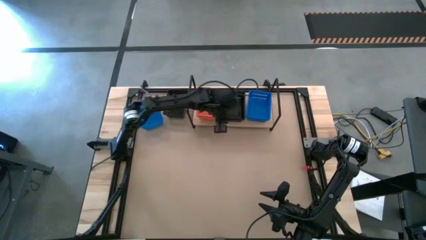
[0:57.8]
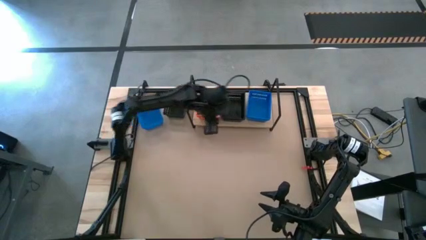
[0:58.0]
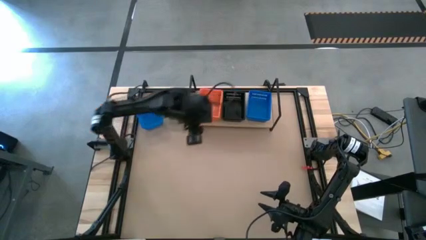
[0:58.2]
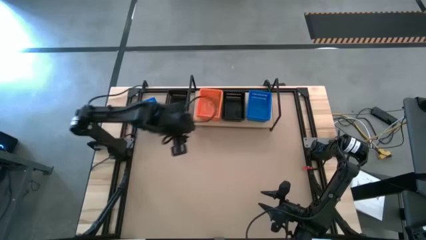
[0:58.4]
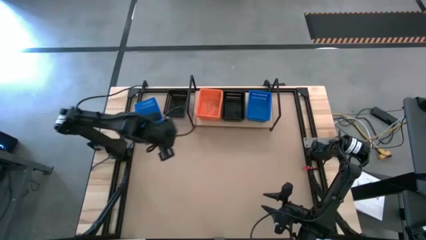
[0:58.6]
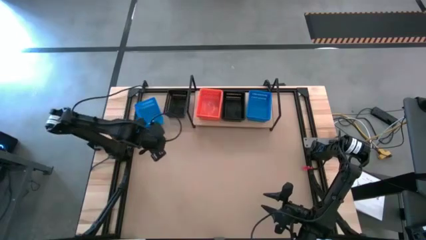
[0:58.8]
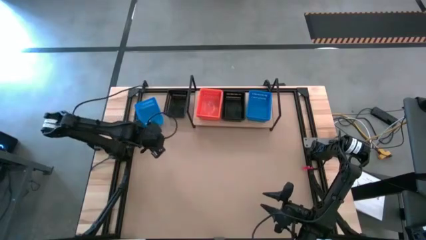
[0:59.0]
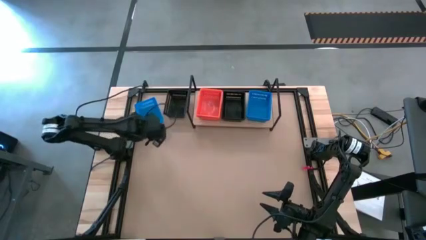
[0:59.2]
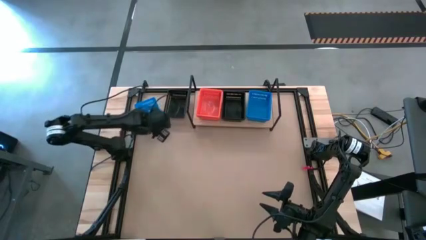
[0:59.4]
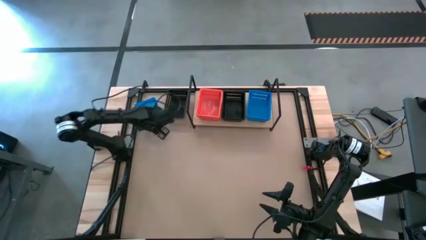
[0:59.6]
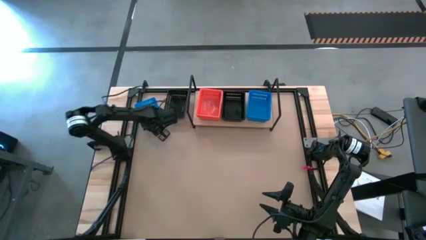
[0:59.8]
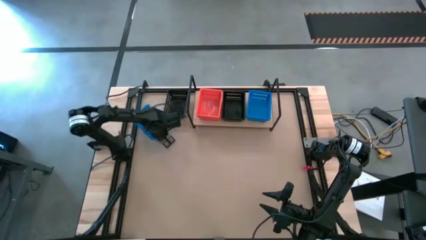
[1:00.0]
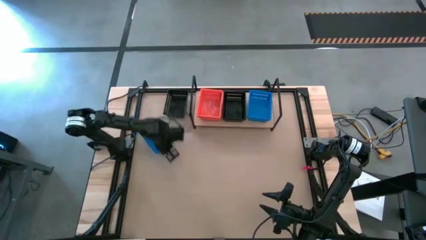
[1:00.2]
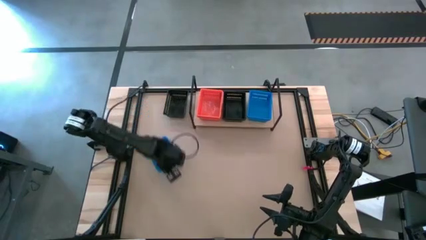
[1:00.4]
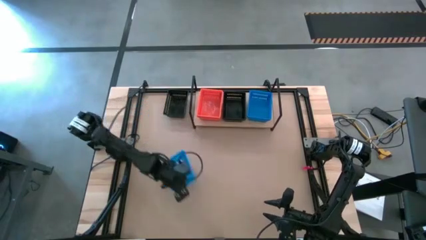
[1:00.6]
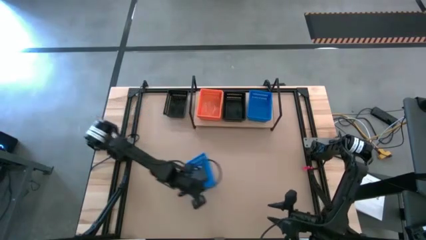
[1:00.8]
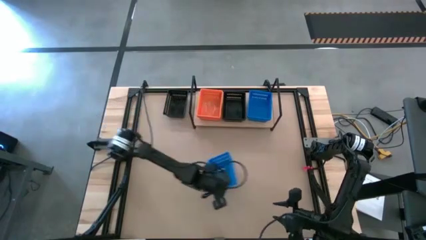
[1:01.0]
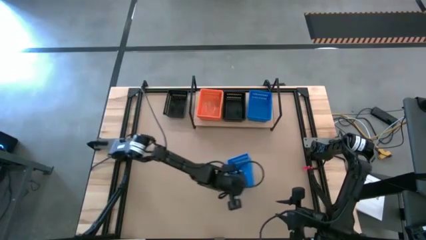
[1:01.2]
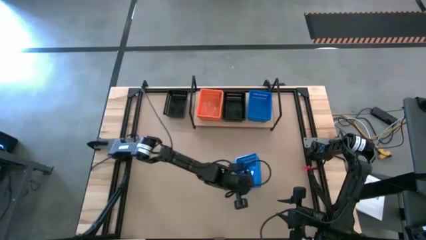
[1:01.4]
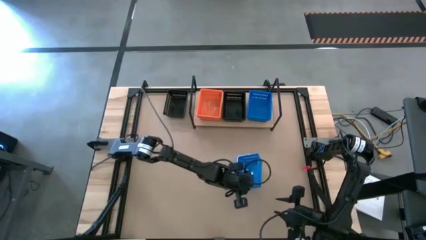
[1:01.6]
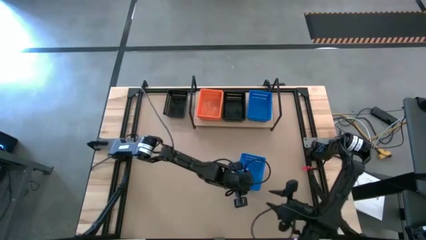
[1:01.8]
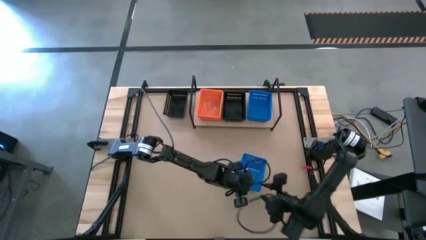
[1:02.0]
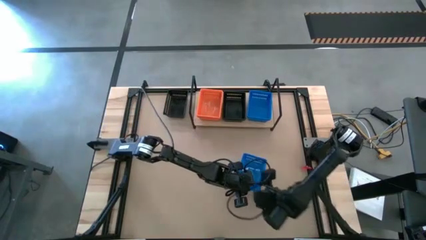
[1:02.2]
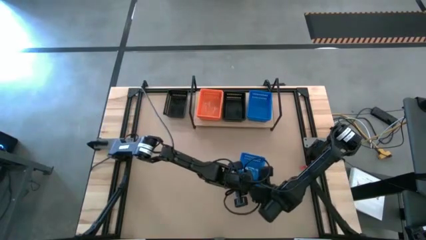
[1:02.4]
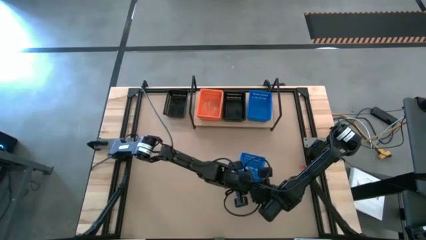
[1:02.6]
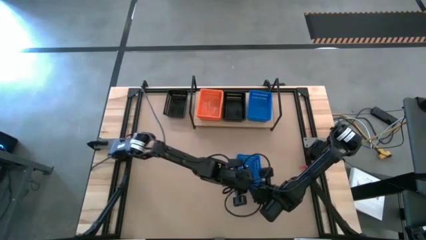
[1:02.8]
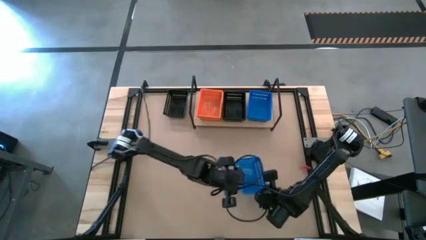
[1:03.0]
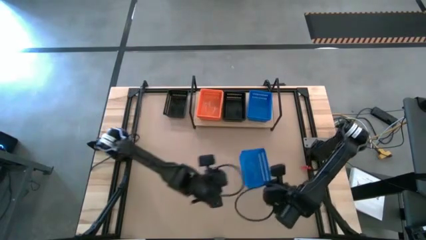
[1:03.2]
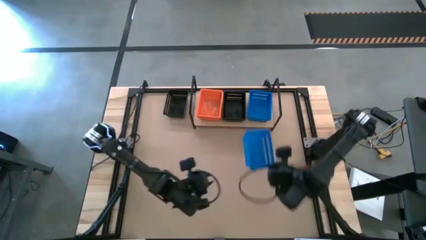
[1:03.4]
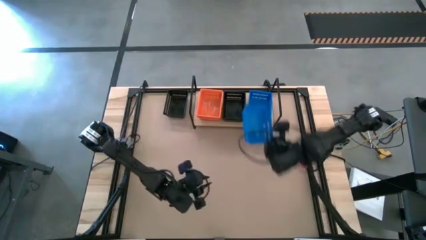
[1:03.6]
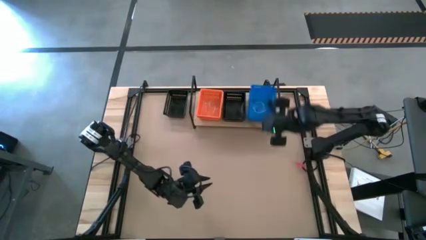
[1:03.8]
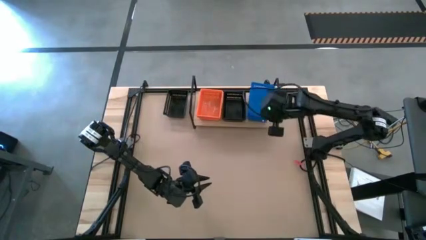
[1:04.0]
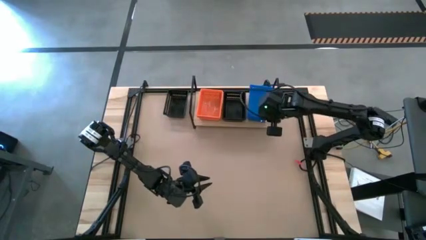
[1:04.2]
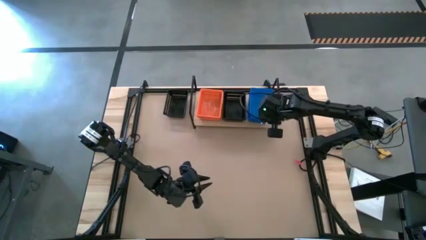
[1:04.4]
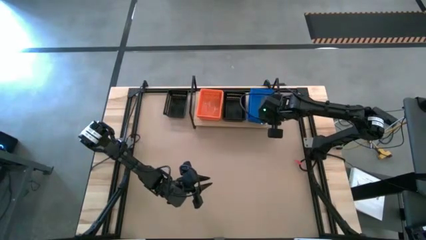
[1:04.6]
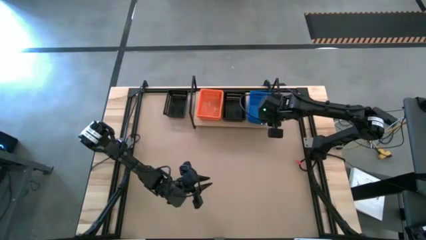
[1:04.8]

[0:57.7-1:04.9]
Task: Stack baskets on shelf by color
Stack the blue bin on the stacked blue bins on the shelf

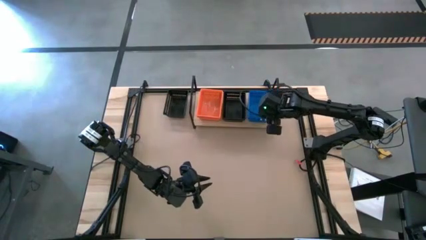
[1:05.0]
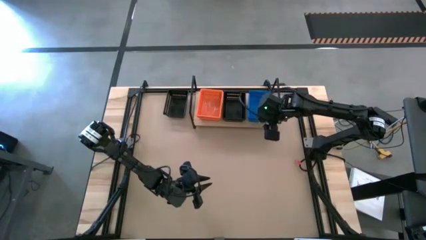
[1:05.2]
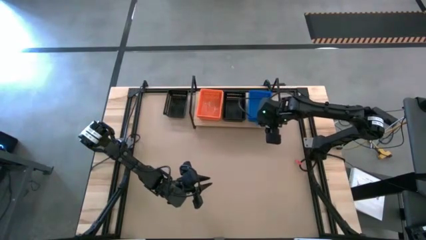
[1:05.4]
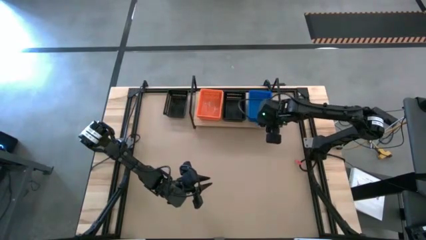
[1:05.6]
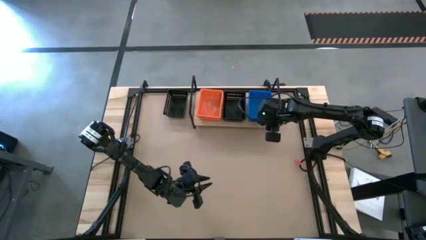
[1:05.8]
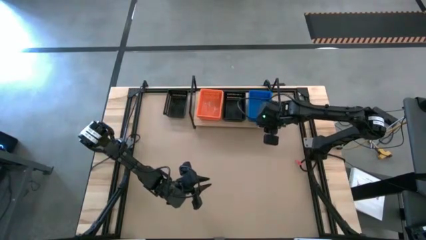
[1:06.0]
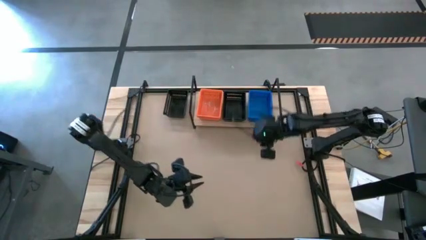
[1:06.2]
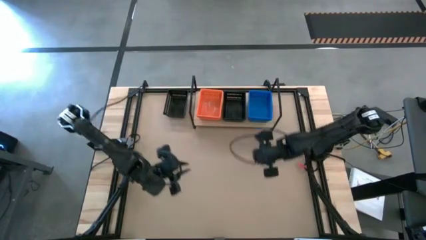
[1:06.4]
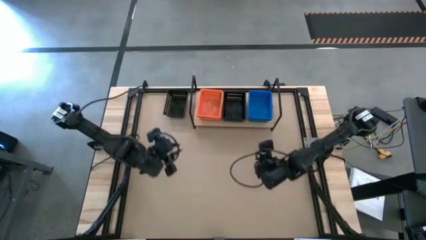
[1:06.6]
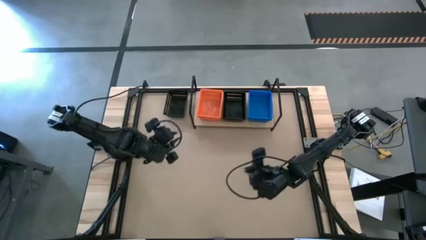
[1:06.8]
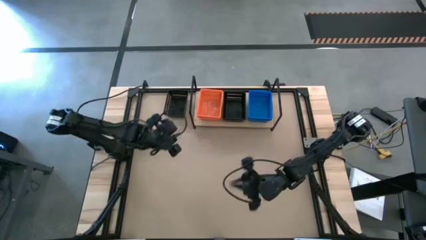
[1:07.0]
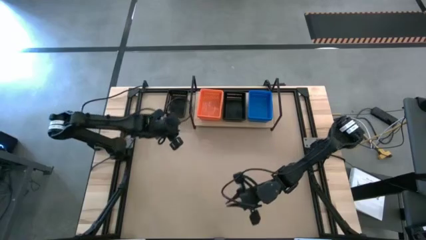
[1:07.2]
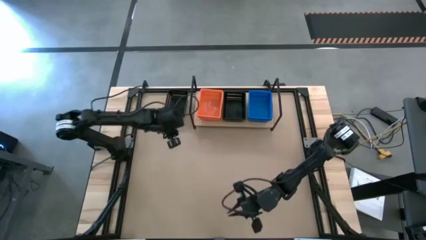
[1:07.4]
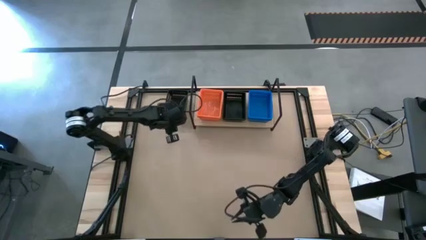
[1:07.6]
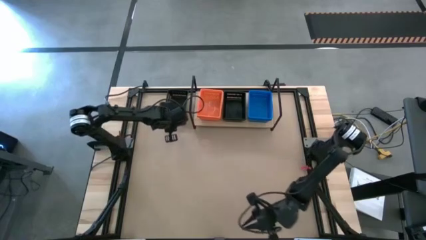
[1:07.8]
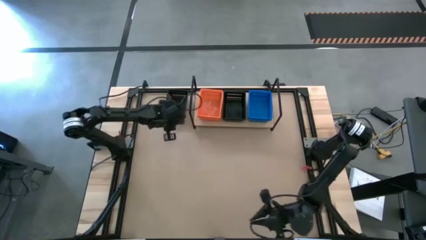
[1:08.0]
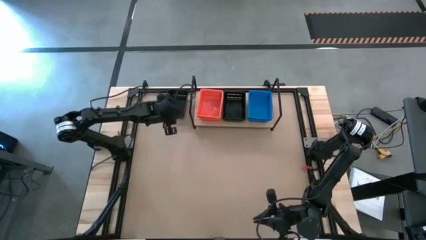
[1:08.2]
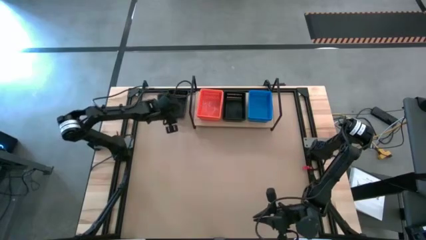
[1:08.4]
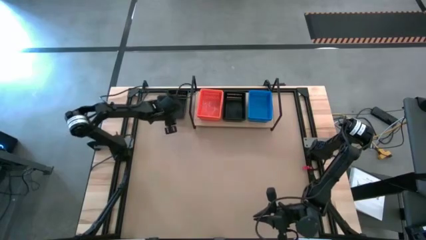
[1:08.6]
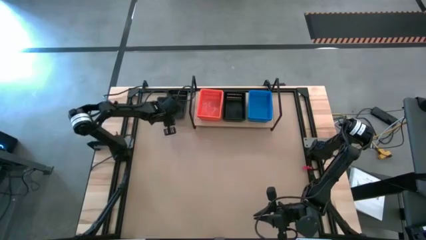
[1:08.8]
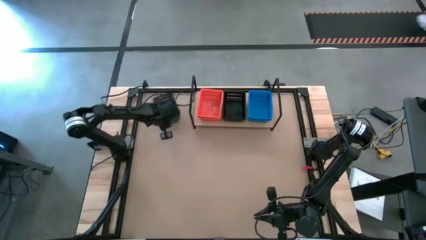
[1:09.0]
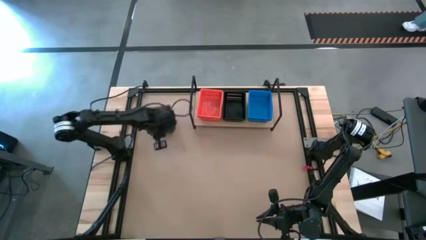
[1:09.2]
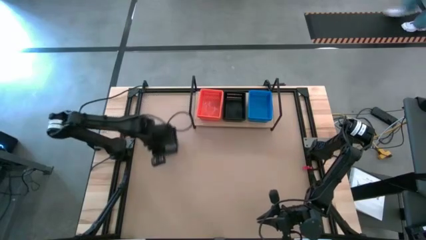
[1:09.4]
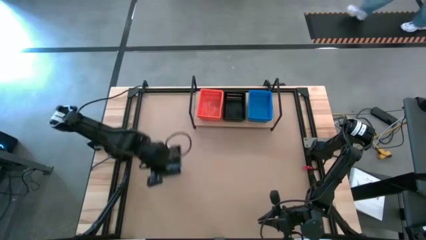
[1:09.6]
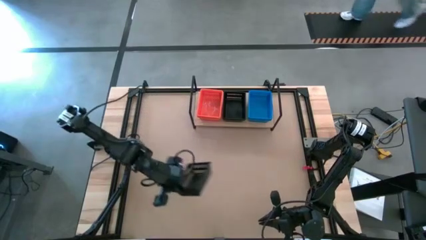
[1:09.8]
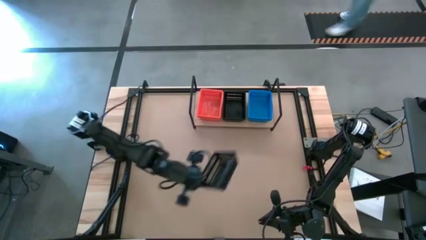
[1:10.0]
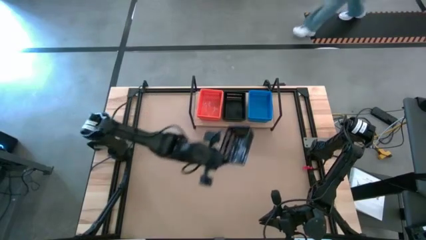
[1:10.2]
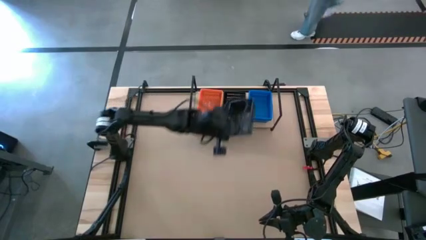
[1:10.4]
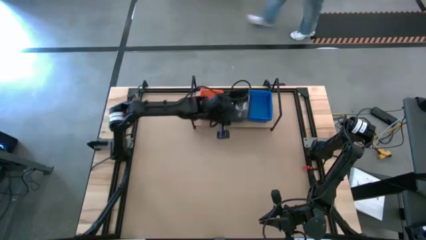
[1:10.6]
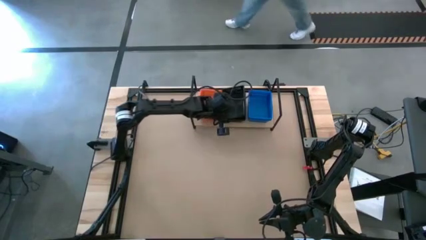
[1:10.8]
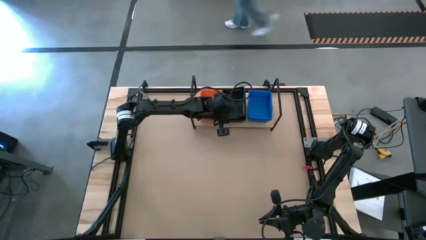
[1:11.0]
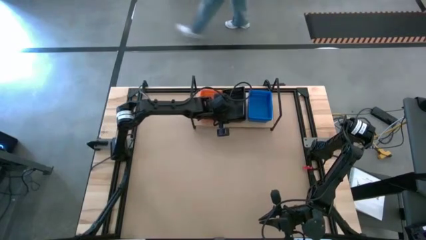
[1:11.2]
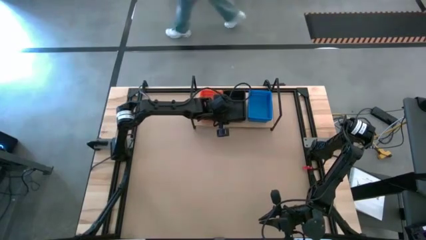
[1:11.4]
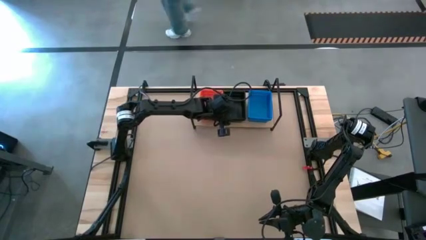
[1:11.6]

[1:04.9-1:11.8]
Stack the black bin on the stacked black bins on the shelf

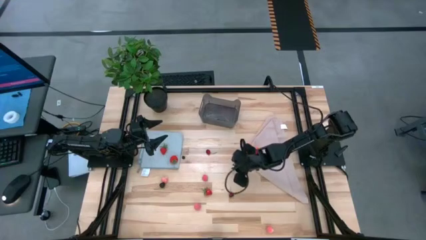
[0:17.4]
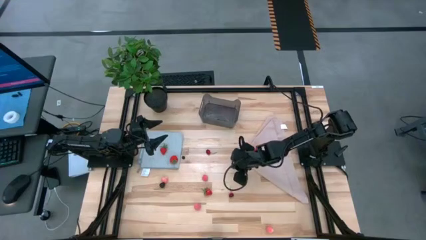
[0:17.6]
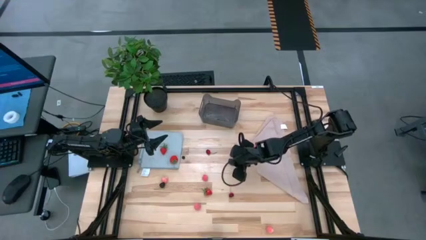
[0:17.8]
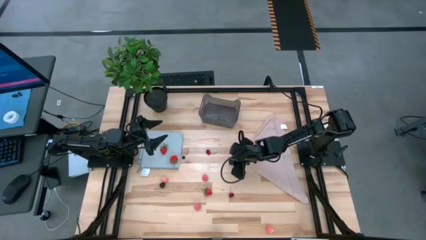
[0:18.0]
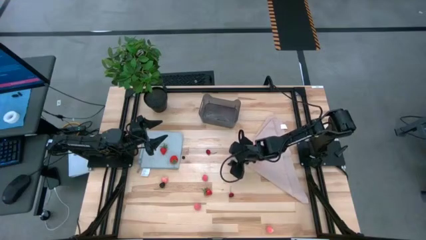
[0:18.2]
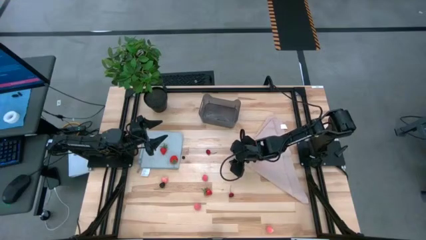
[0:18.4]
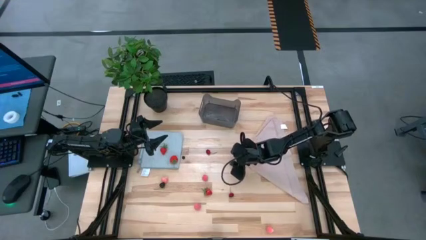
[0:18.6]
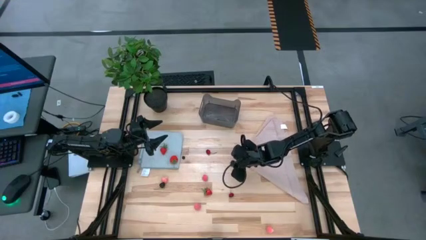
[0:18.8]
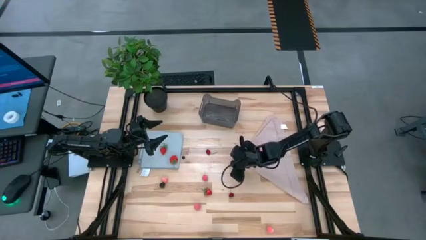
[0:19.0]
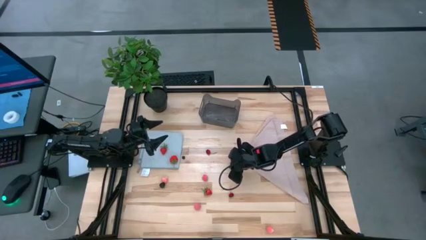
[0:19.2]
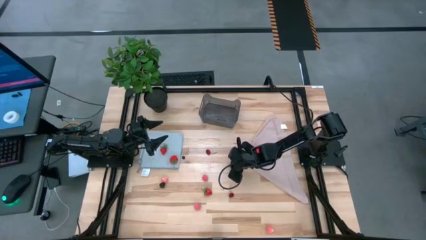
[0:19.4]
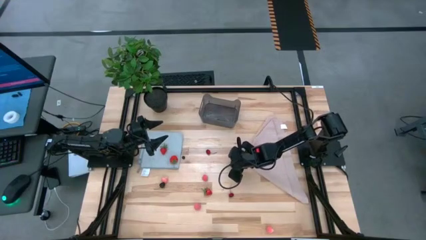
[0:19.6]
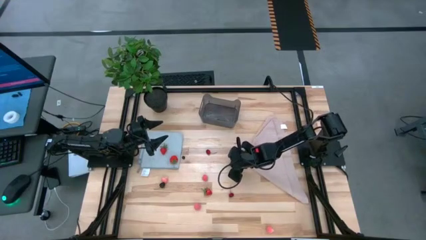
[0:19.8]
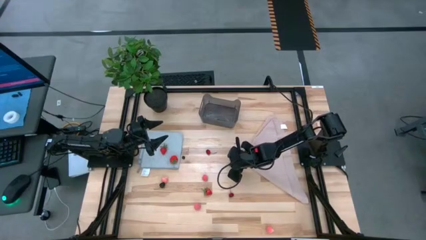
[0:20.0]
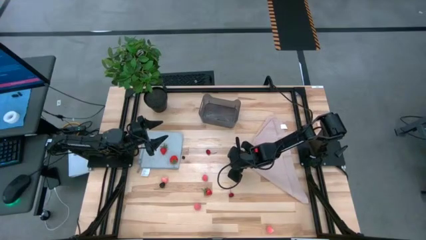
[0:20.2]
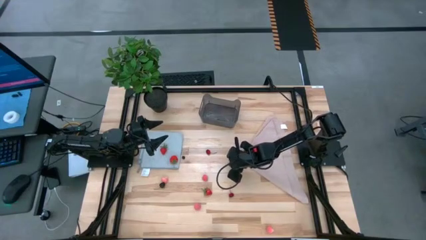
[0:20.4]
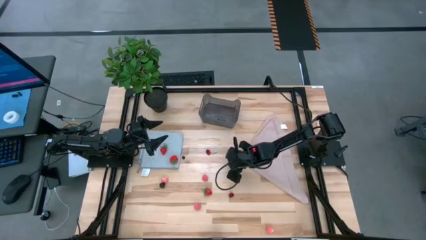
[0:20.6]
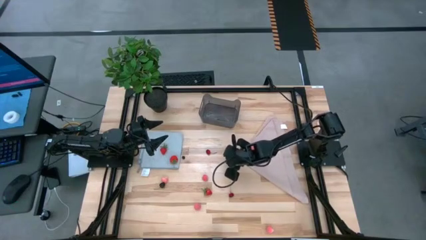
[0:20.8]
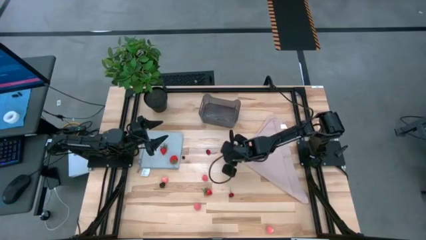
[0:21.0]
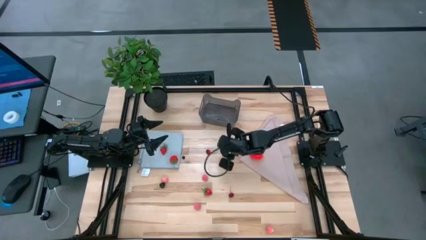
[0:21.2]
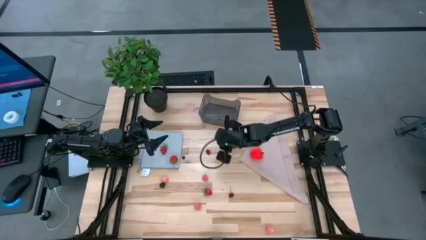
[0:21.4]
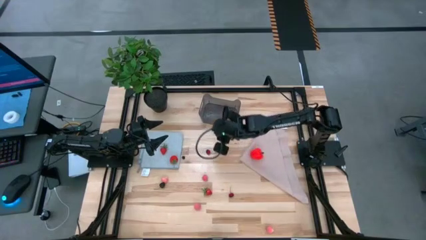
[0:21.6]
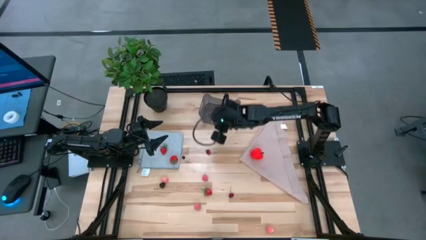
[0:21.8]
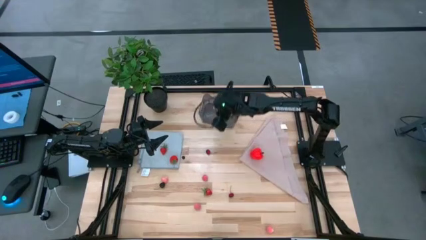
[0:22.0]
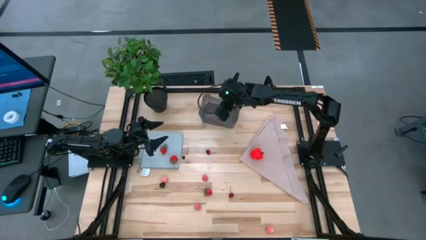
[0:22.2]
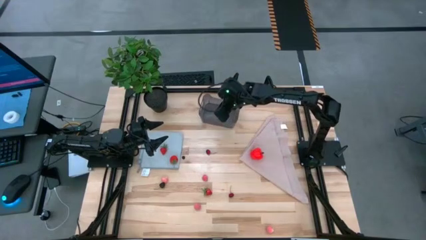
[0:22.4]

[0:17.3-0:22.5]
Task: Pick and placing Produce into tupperware
Put the blackberry into the black bin
